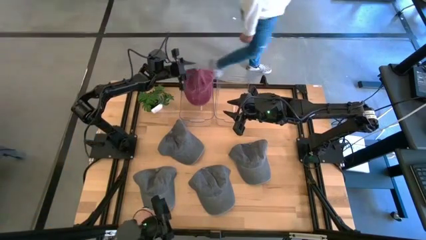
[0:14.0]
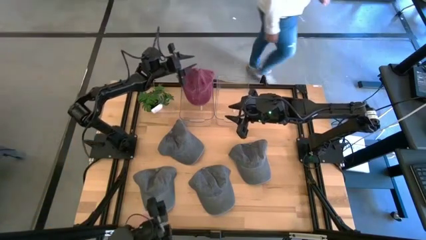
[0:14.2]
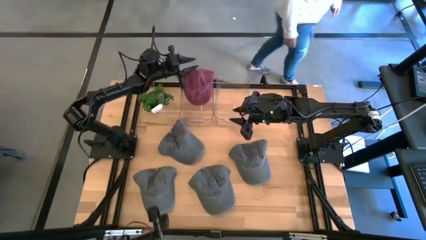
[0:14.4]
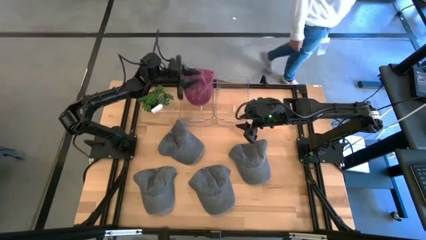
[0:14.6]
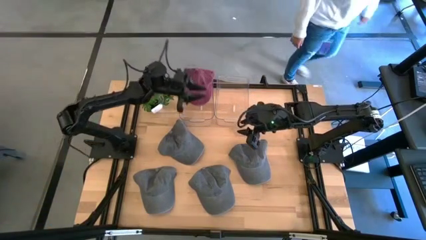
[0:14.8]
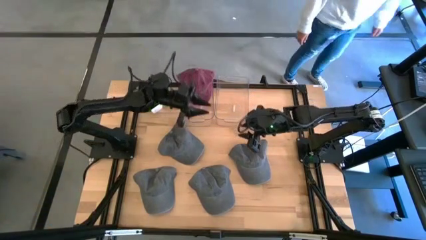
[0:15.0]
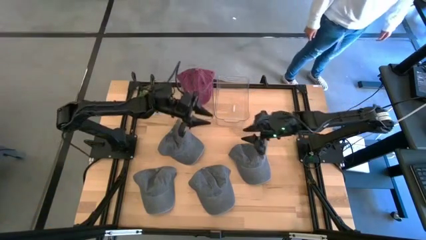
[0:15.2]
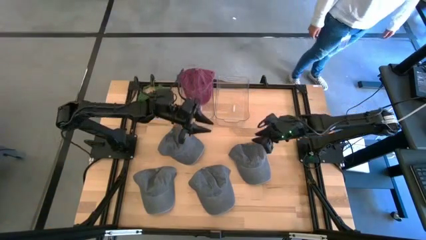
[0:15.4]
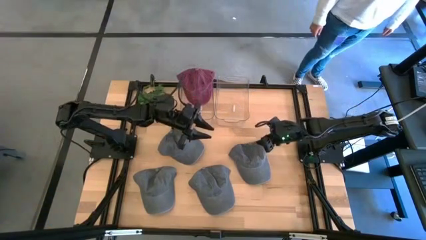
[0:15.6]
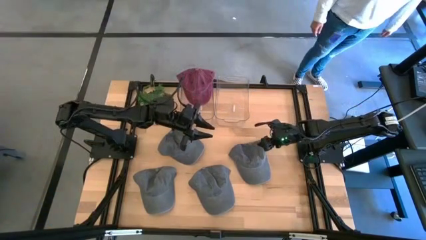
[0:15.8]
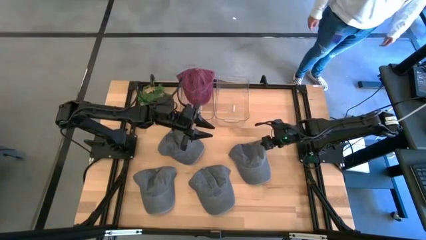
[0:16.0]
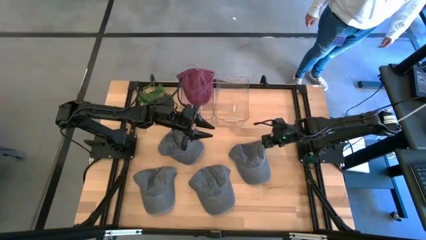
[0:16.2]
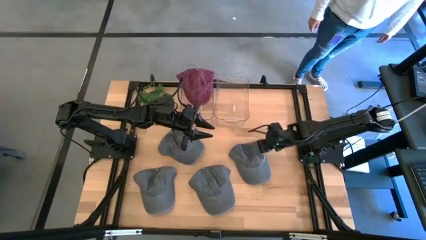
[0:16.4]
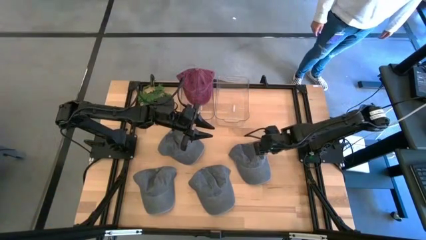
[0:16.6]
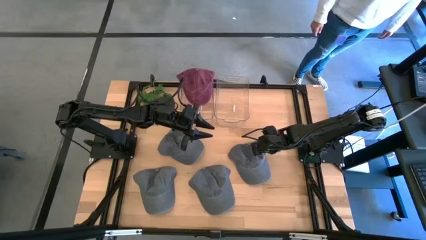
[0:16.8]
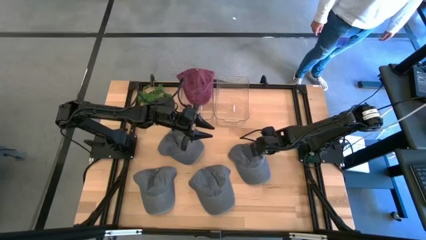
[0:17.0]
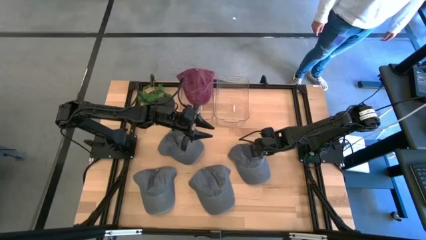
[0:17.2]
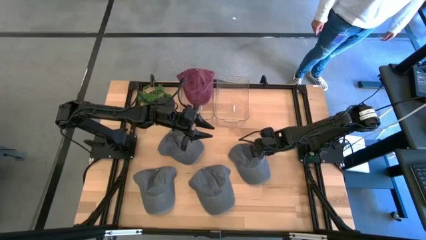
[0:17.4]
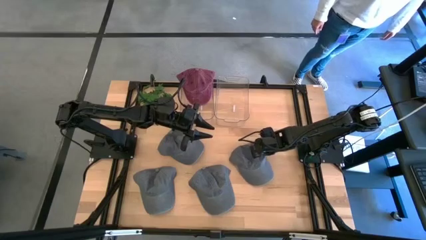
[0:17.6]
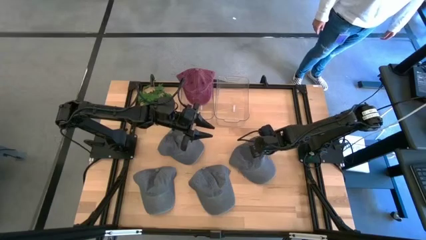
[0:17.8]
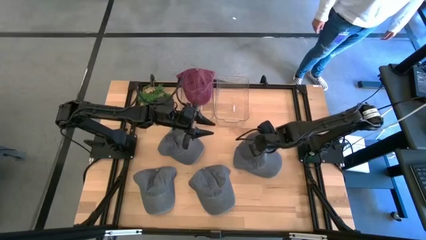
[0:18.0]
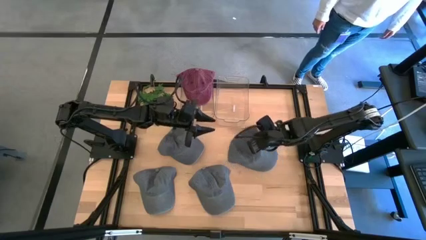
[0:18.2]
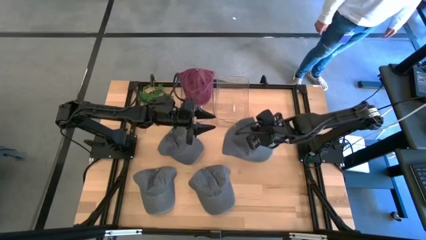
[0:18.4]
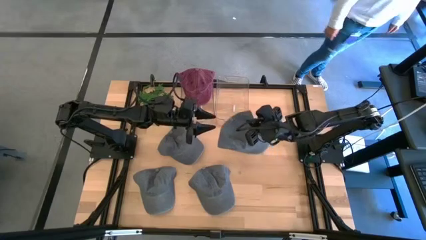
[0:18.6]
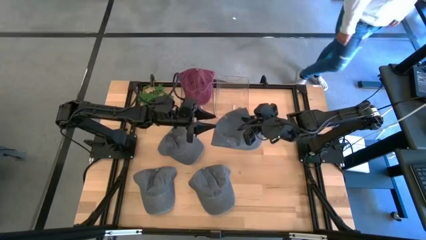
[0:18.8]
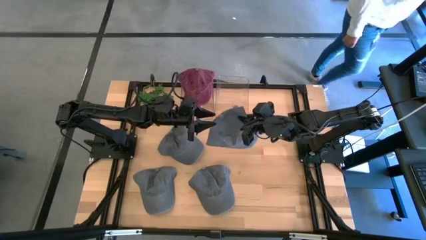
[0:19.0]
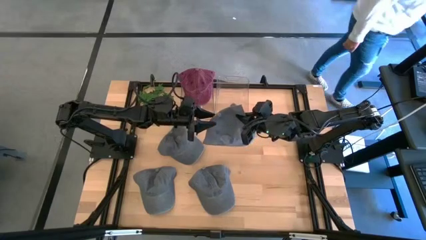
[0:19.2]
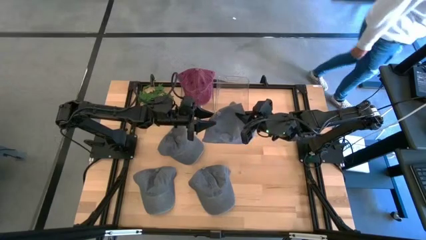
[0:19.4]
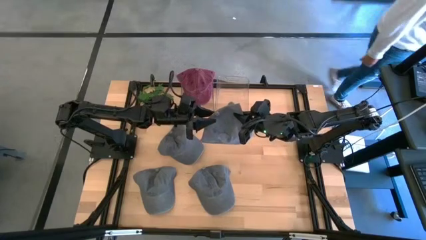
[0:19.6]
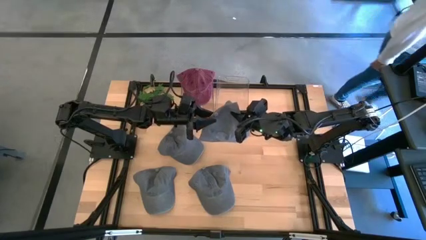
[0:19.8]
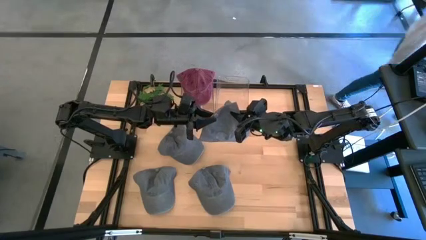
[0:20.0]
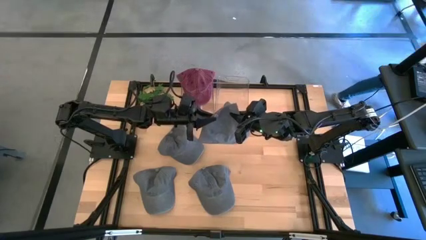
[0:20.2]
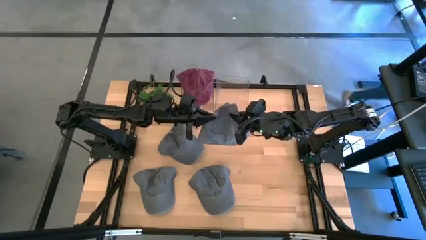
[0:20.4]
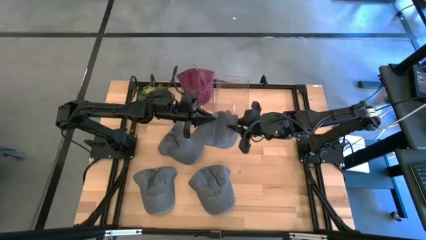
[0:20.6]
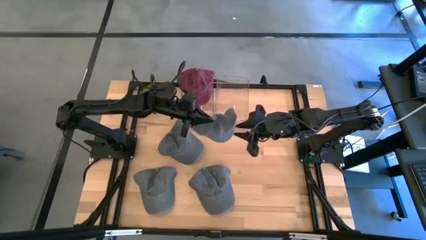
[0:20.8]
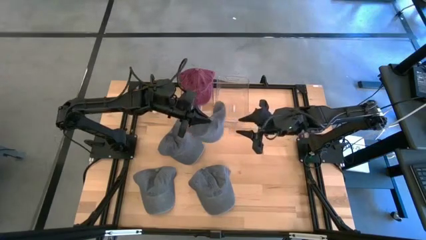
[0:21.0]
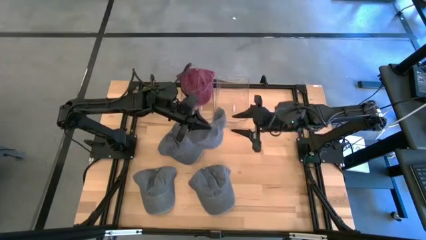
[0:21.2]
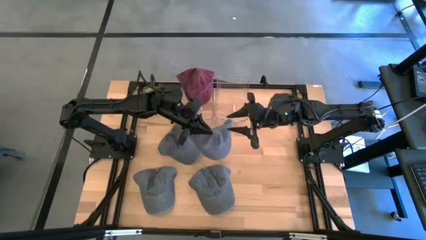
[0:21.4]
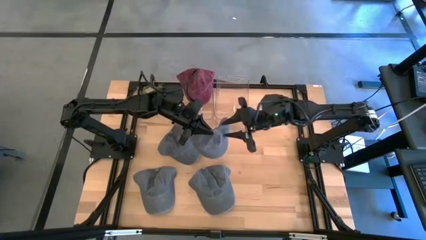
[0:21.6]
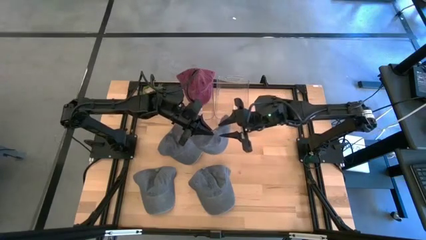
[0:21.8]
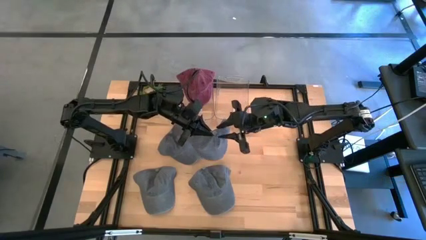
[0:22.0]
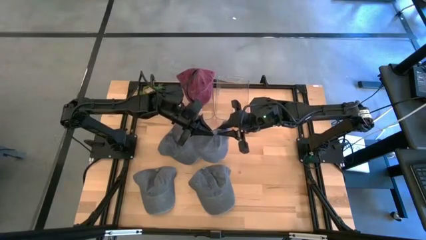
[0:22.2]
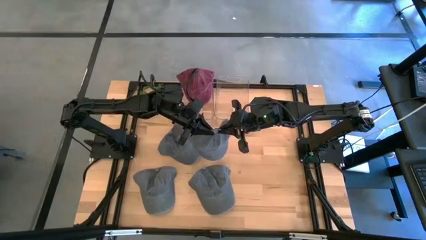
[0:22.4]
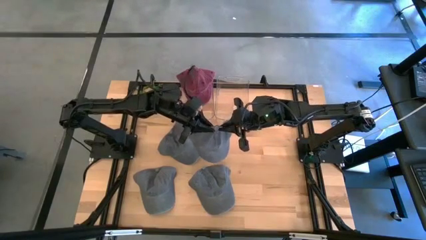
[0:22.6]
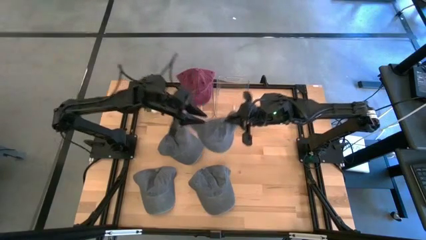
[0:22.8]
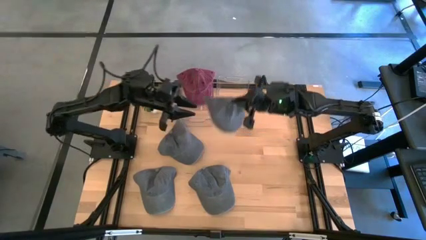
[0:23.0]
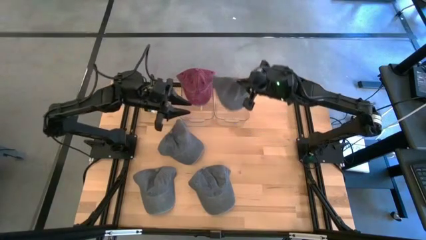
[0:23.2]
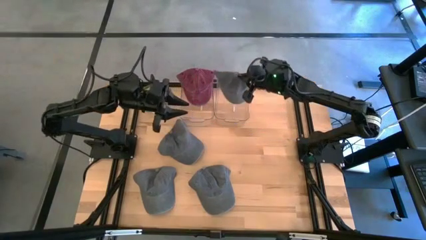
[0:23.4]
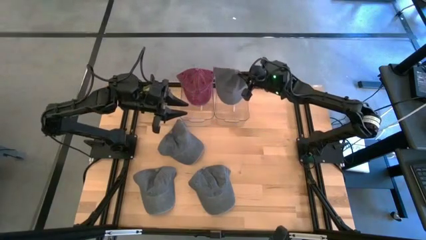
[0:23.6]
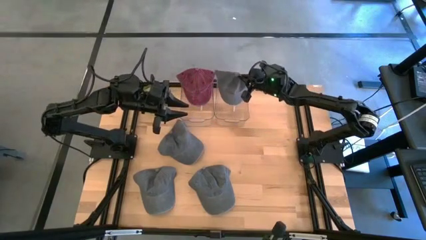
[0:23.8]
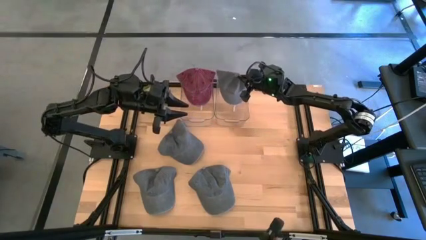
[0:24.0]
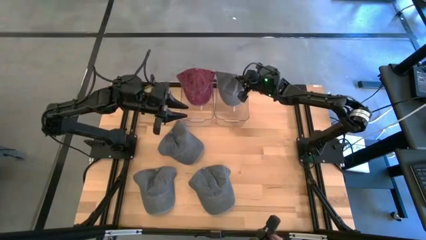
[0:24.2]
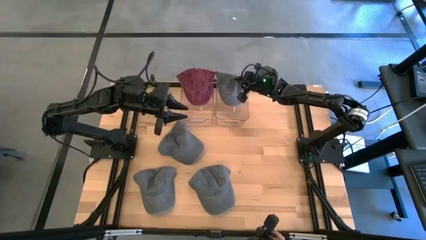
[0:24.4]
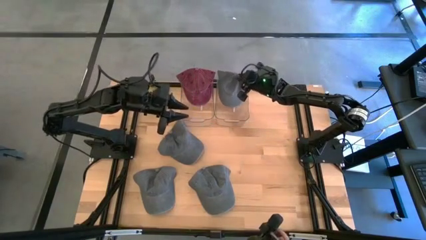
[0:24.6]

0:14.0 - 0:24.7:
Task: Pick & Place hat
Put the gray cap into the right transparent bin

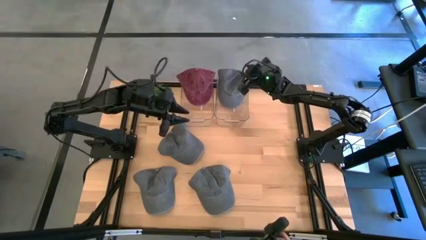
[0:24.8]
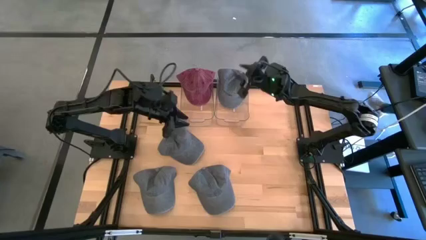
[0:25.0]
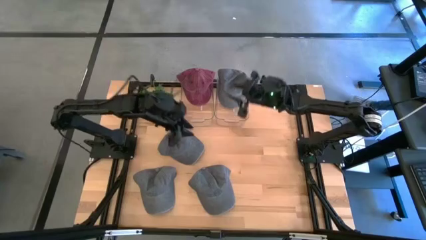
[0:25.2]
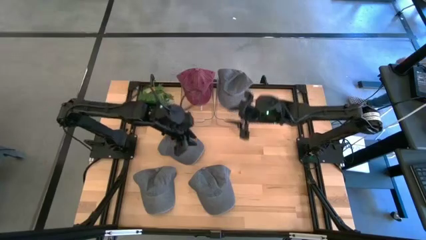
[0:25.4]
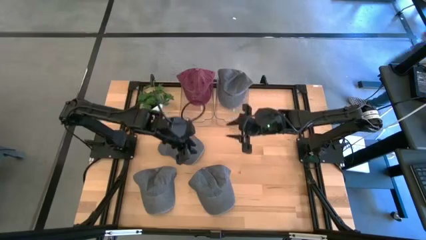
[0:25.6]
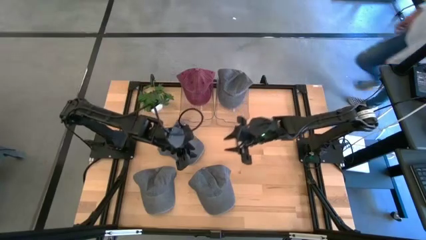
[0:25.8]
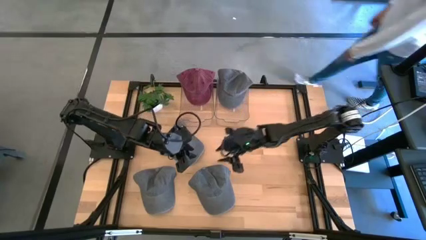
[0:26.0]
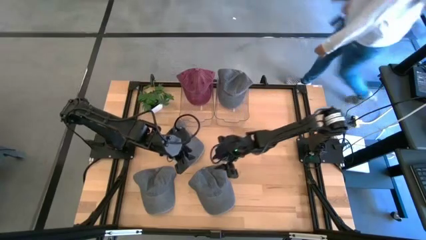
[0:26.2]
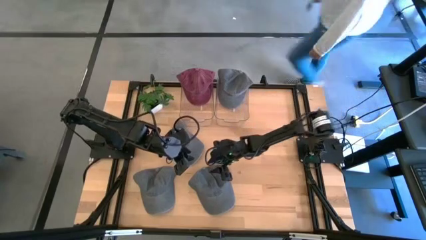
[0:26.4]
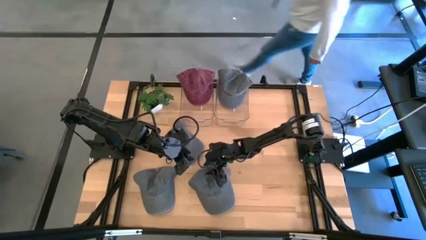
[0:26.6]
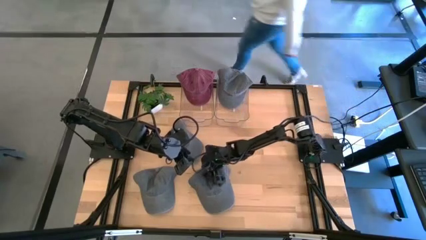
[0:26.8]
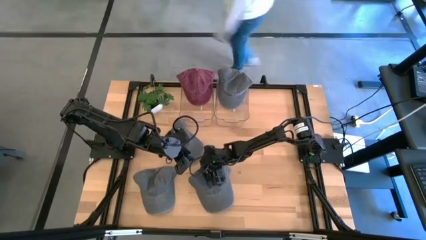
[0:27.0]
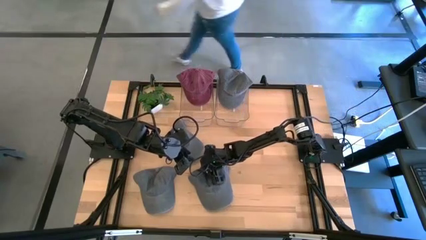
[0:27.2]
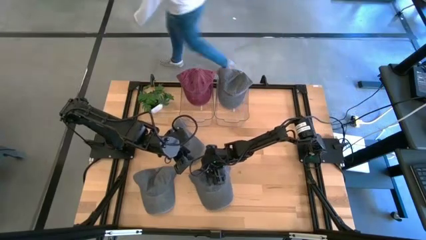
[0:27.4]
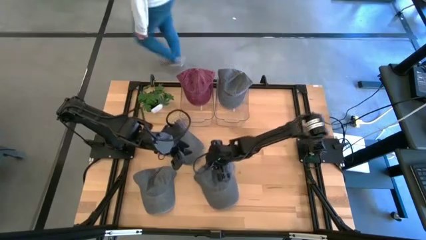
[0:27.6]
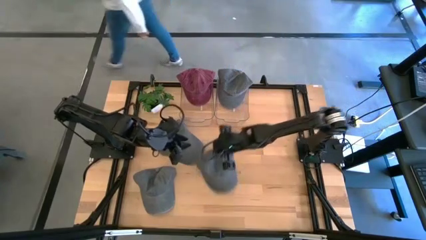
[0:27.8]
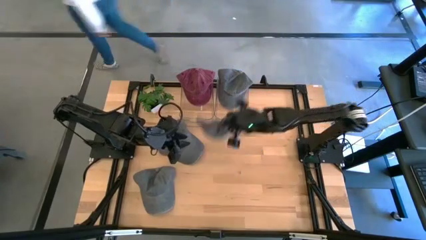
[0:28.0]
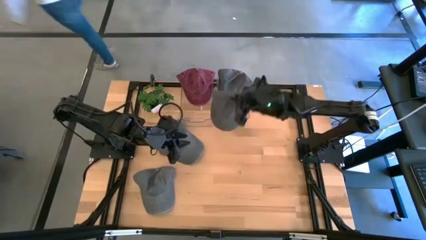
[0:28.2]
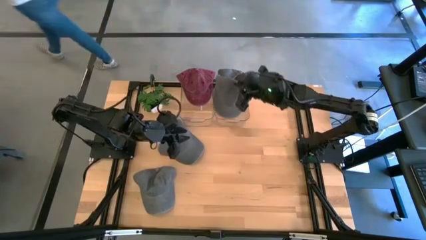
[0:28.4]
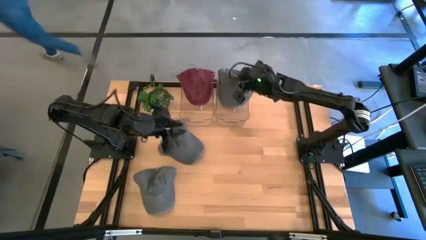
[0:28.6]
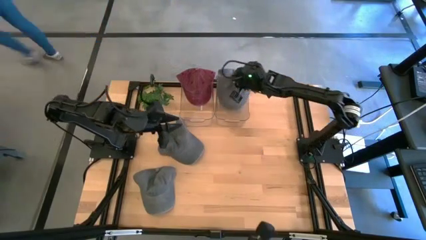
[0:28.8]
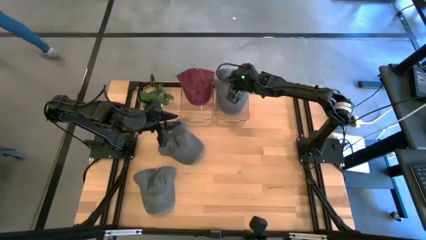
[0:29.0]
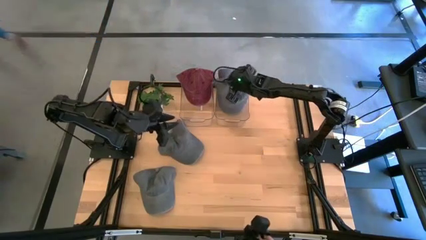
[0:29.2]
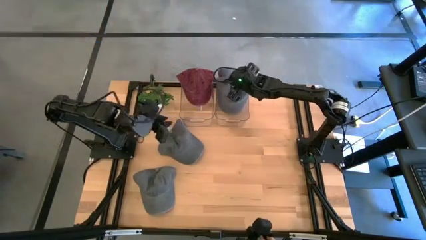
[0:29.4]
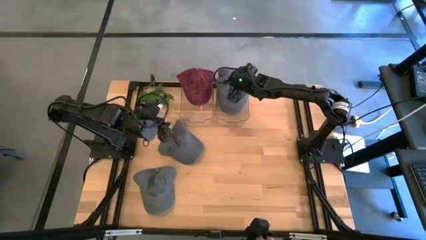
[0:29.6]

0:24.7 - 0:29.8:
Put the gray cap into the right transparent bin
